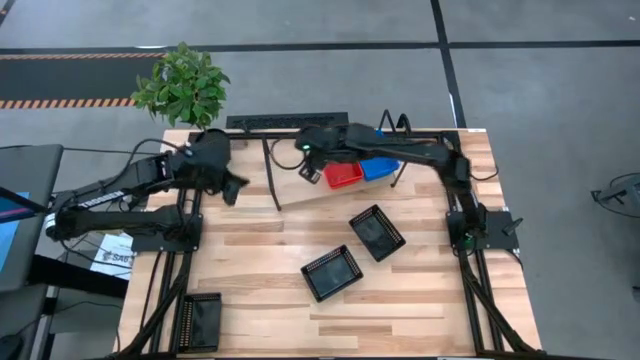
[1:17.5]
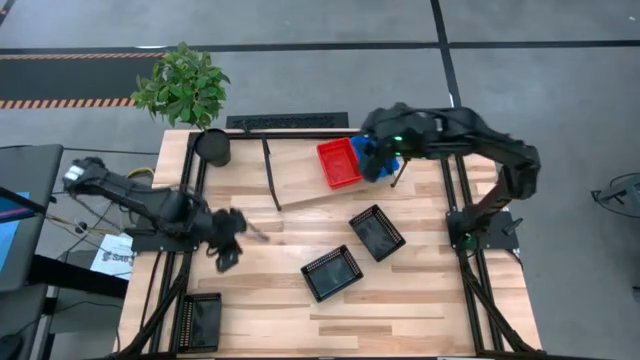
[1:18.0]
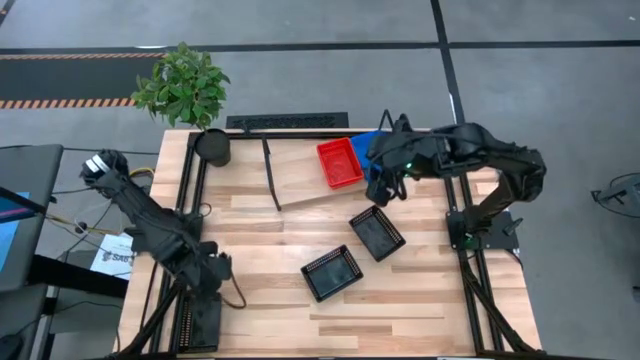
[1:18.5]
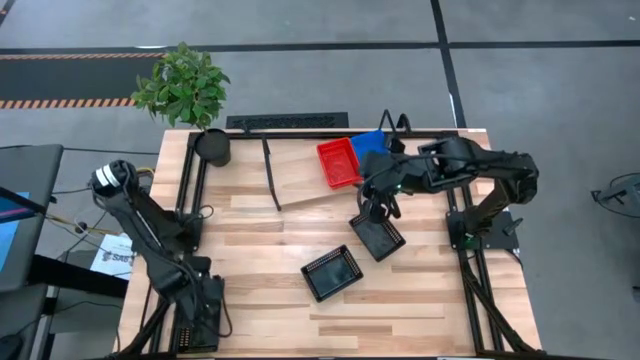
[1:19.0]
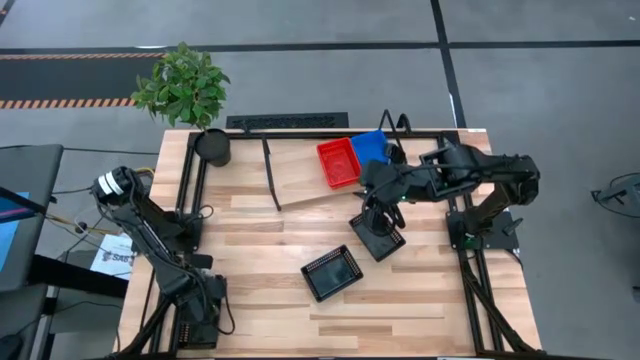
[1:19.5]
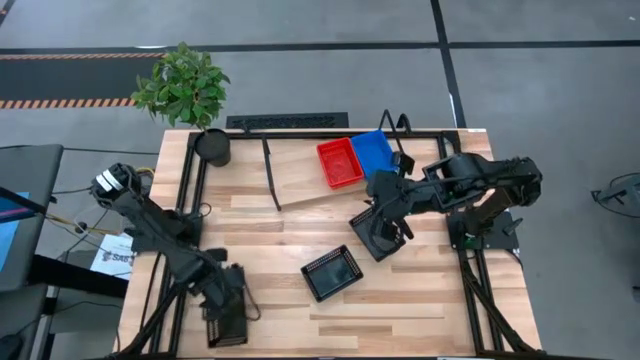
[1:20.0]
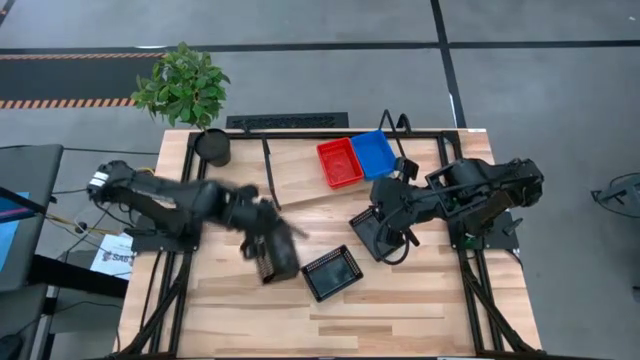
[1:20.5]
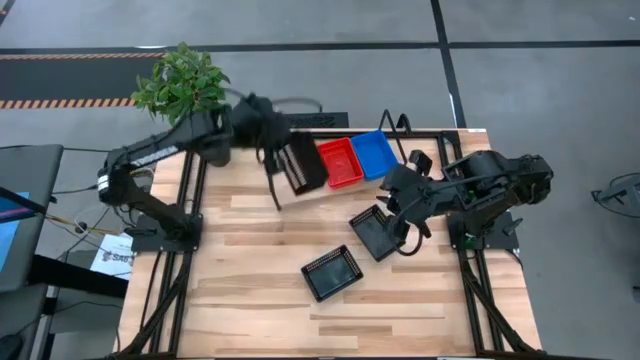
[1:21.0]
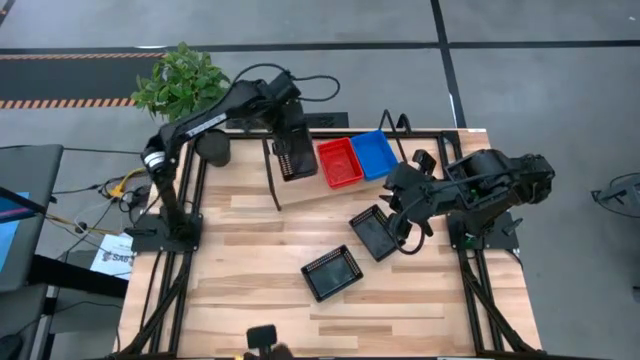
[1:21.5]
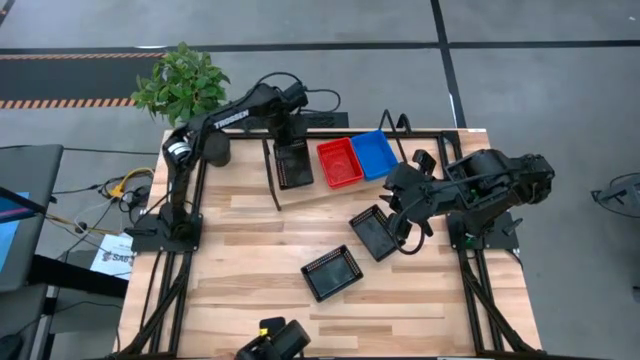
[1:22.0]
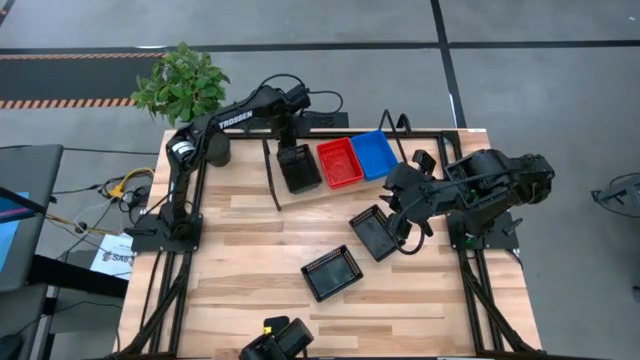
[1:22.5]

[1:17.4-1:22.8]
Task: Stack baskets on shelf by color
Put the left black bin on the shelf

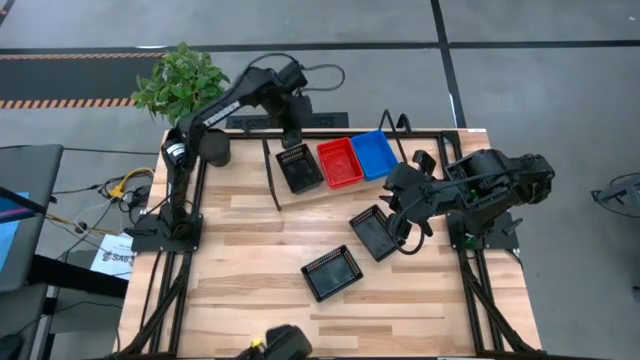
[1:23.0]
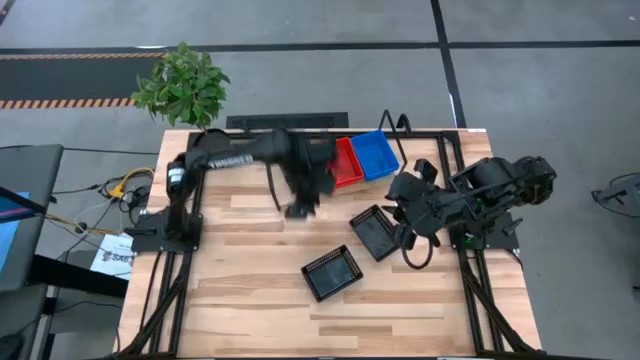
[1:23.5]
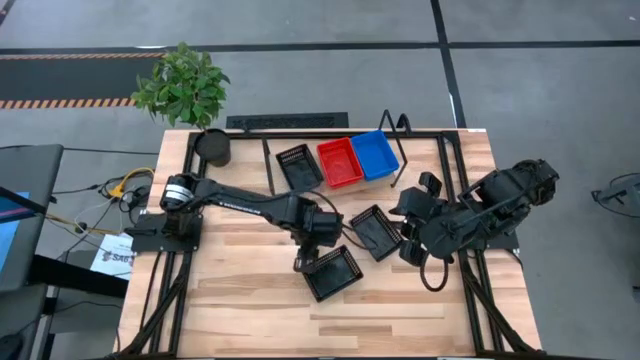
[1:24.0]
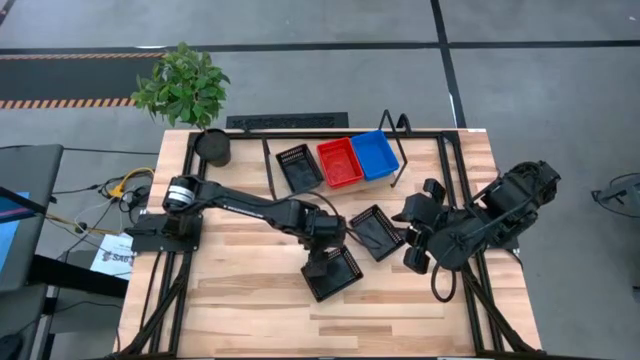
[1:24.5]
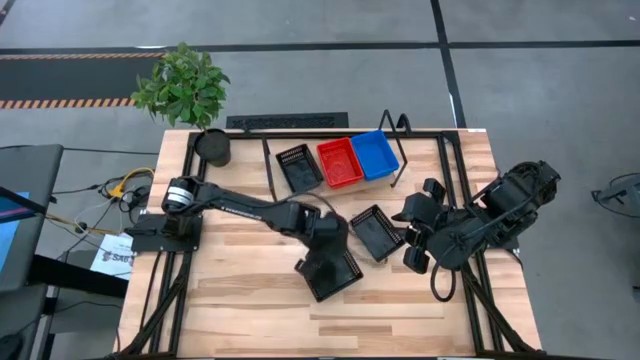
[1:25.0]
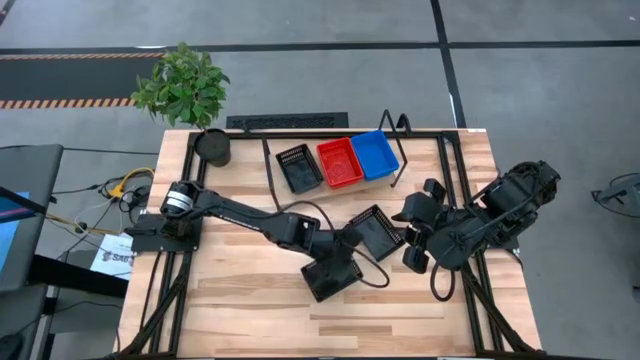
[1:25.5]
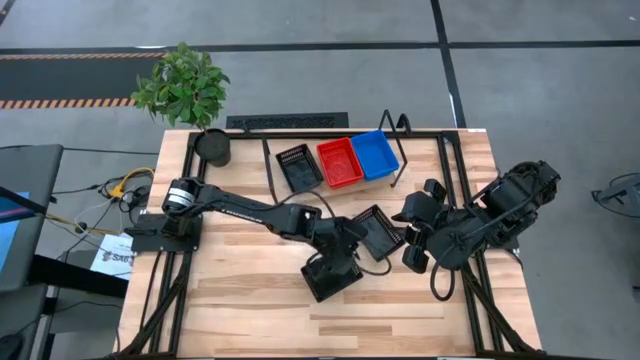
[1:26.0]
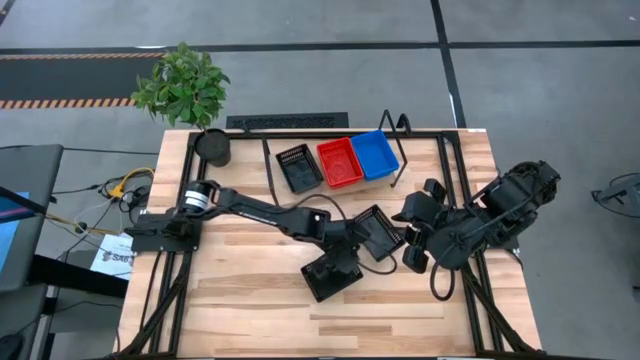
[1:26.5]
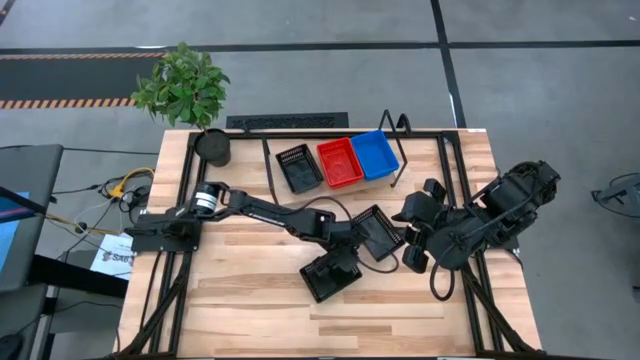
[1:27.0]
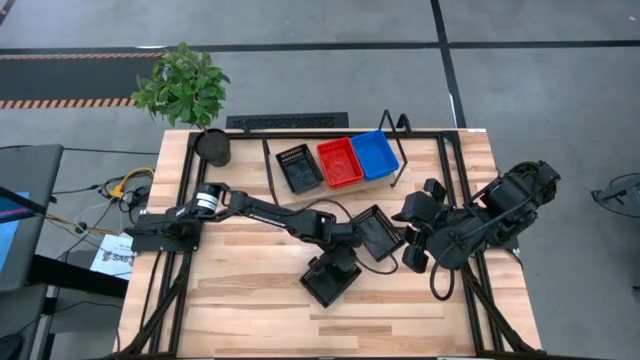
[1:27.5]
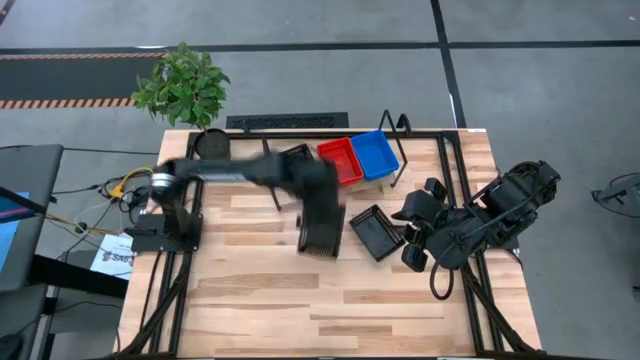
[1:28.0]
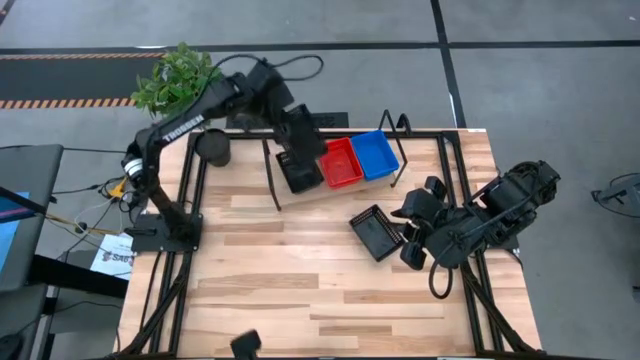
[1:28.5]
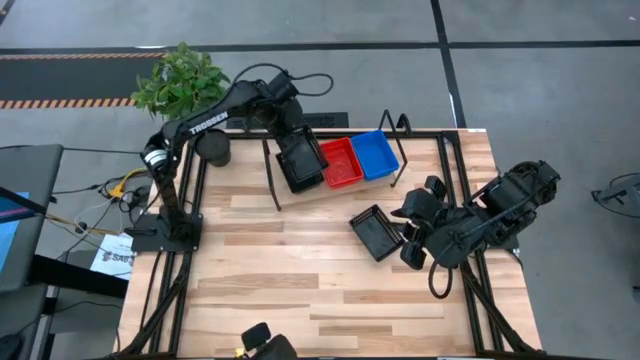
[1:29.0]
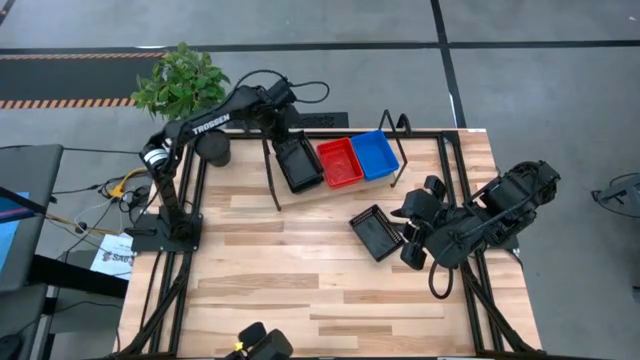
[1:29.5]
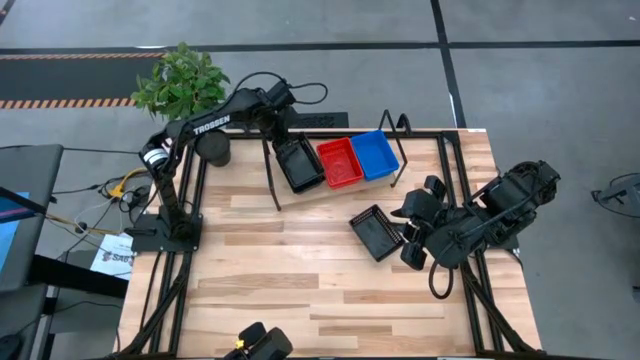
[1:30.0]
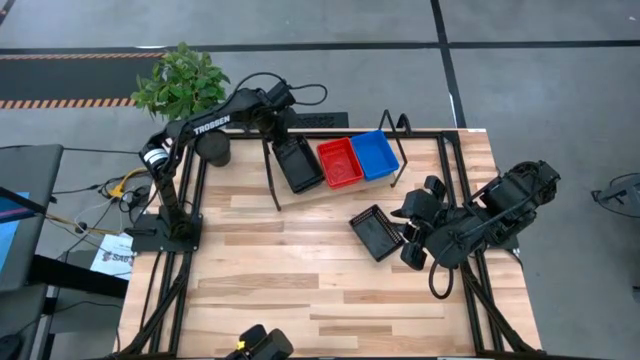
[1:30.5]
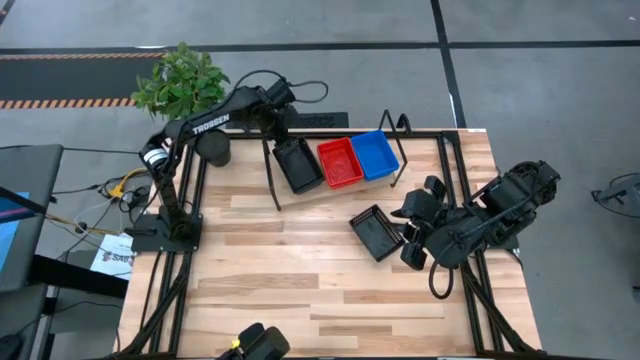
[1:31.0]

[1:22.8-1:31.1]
Stack the left black bin on the top of the black bin on the shelf

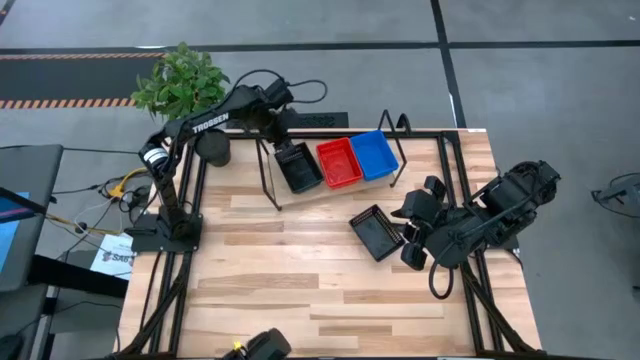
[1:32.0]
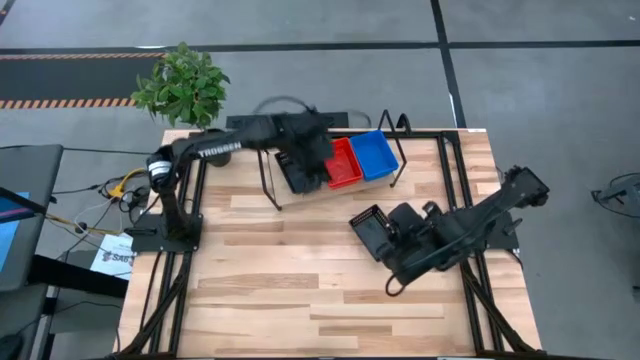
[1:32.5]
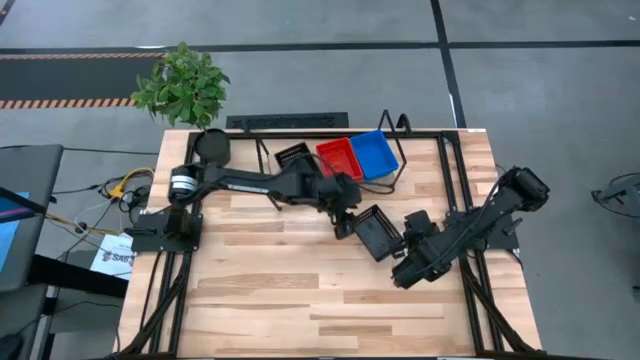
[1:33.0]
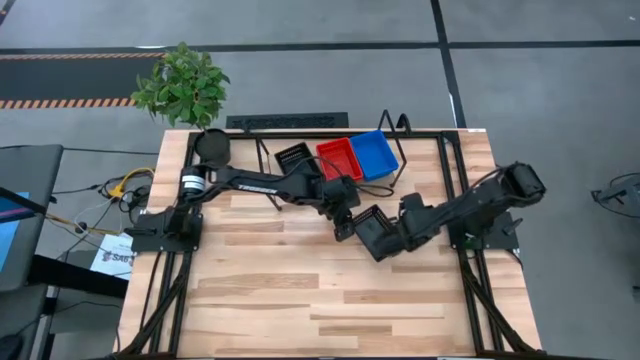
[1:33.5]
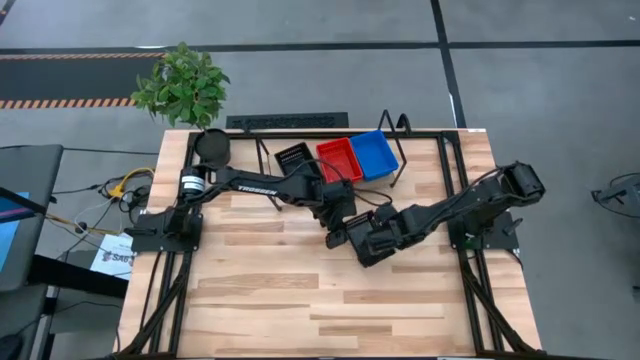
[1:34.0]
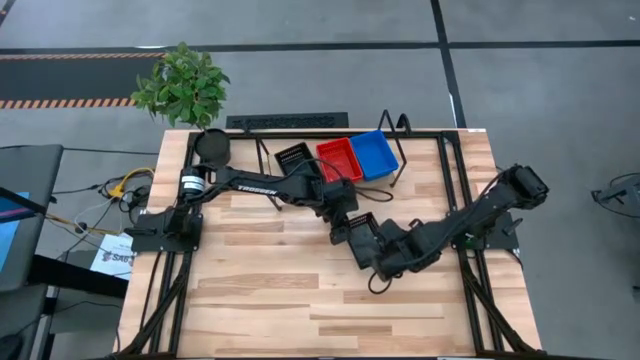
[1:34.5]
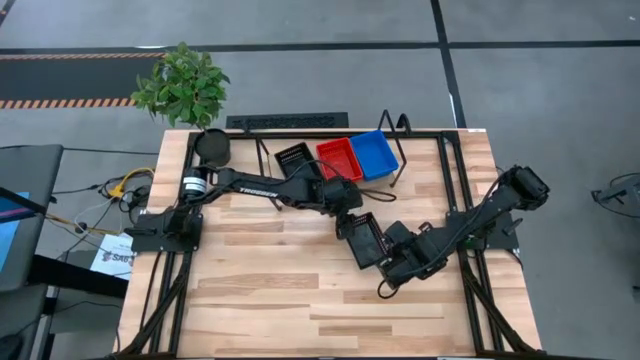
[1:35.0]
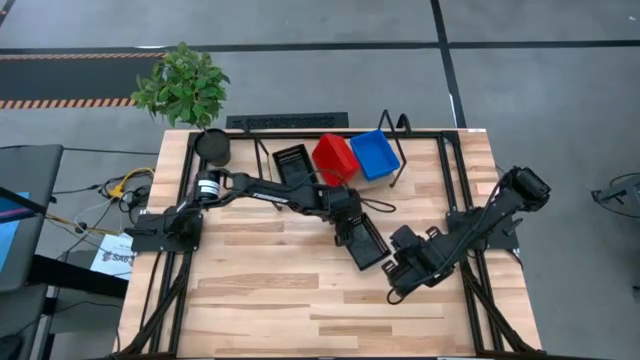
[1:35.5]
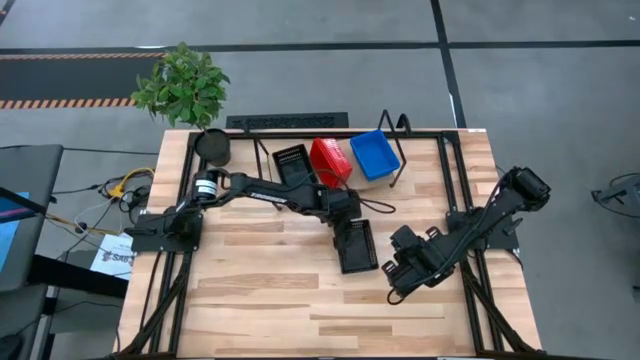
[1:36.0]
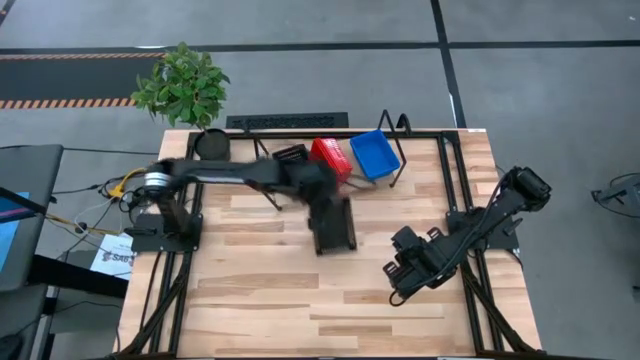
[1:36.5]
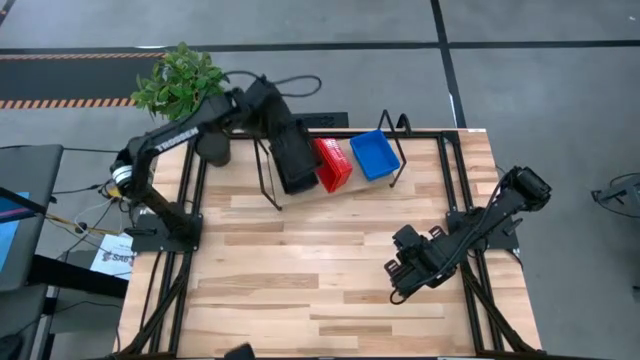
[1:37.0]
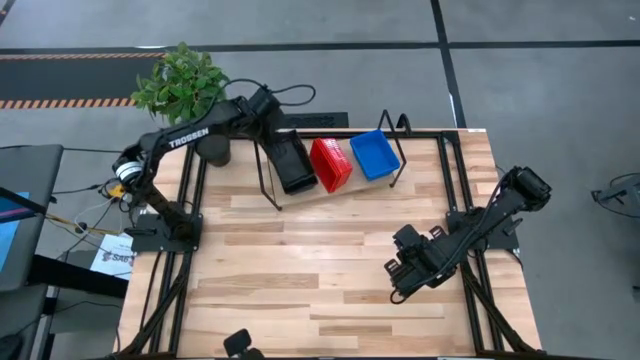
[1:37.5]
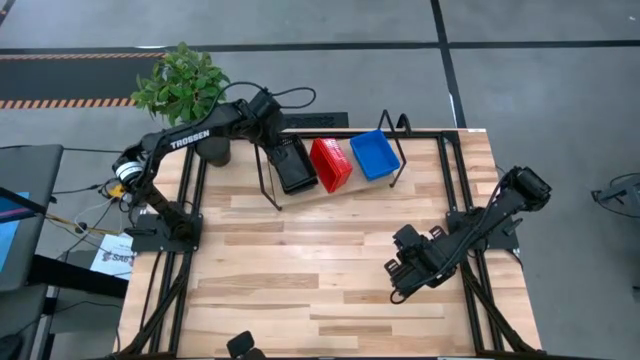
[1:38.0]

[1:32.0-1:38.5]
Stack the black bin on the top of the black bin on the shelf
